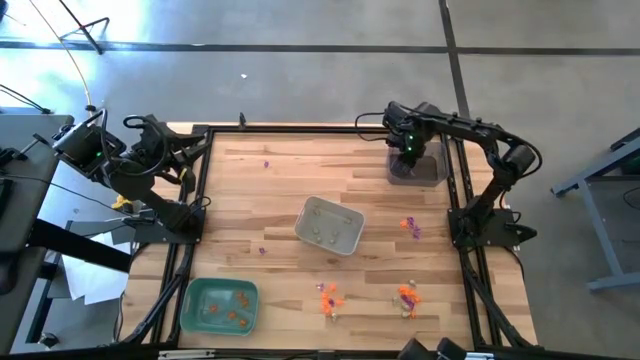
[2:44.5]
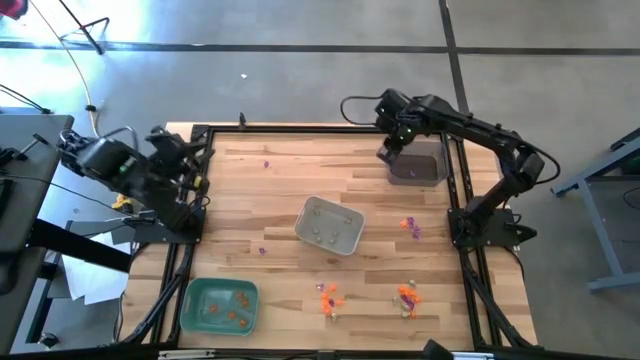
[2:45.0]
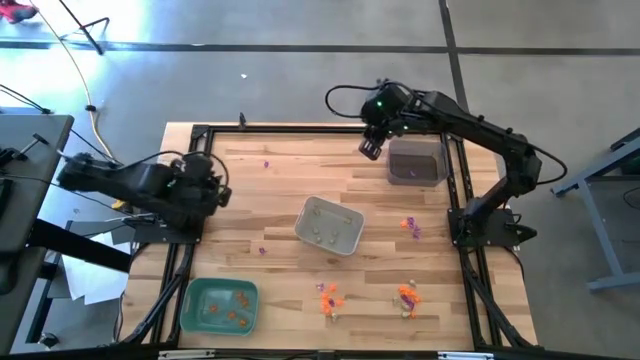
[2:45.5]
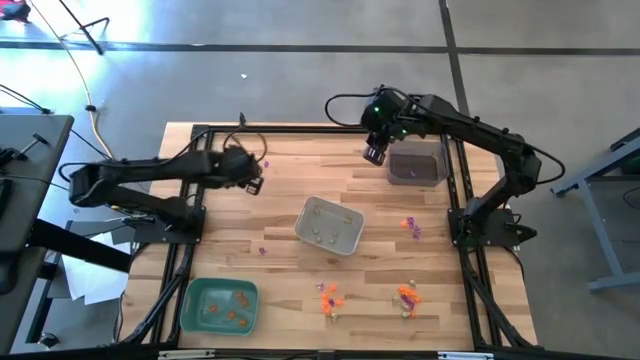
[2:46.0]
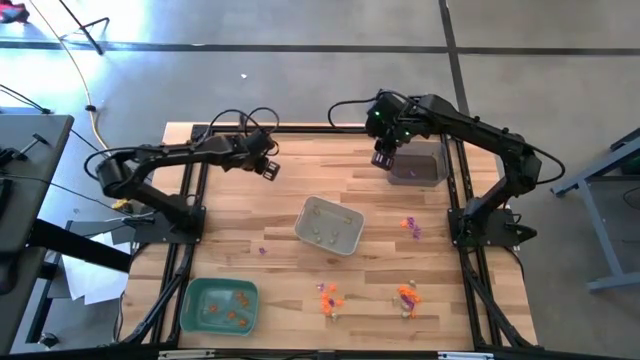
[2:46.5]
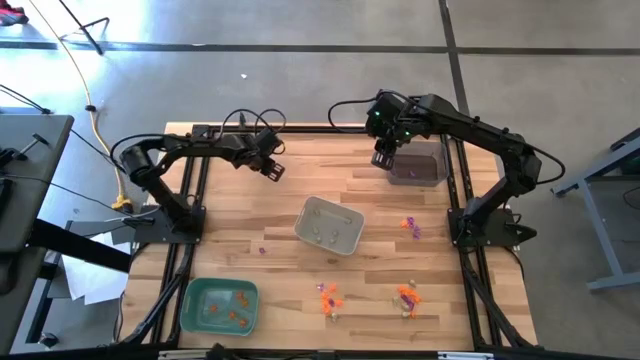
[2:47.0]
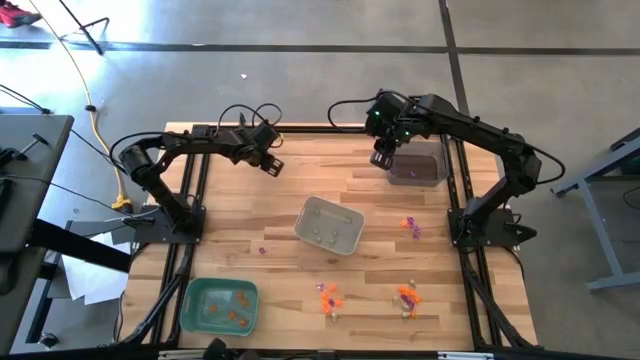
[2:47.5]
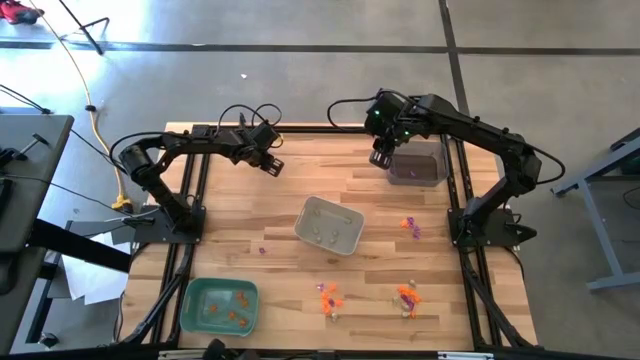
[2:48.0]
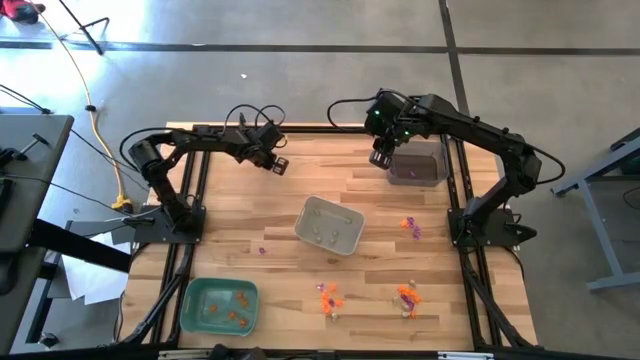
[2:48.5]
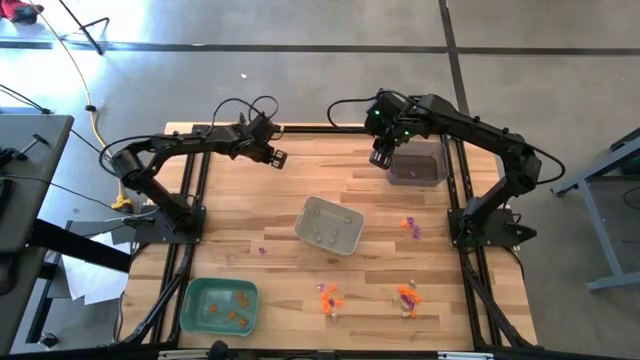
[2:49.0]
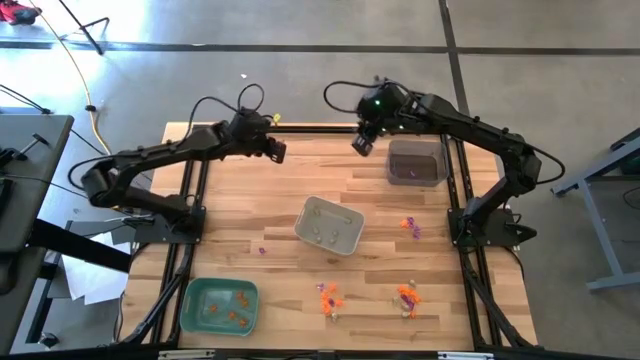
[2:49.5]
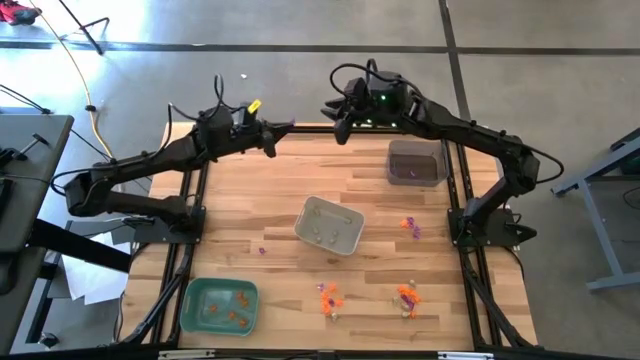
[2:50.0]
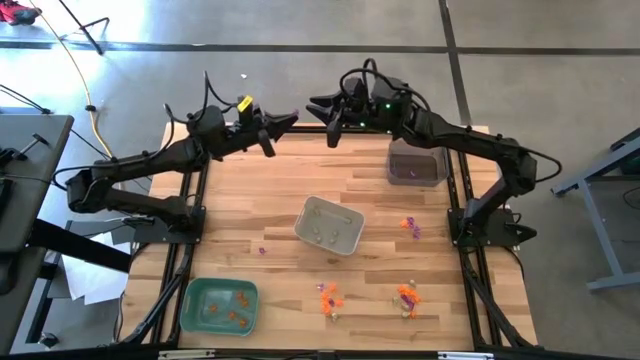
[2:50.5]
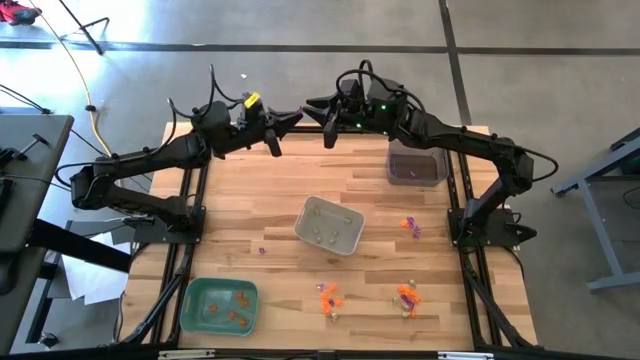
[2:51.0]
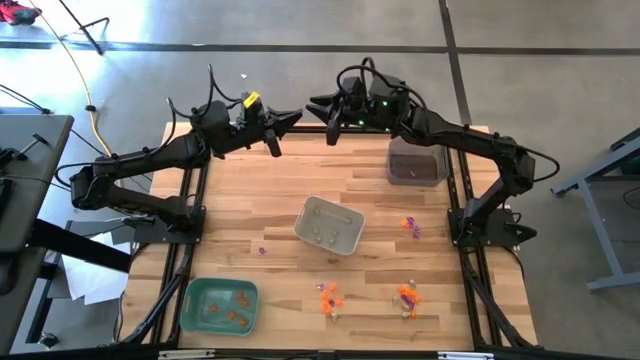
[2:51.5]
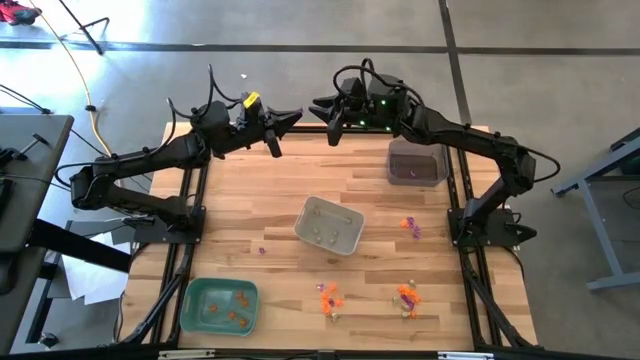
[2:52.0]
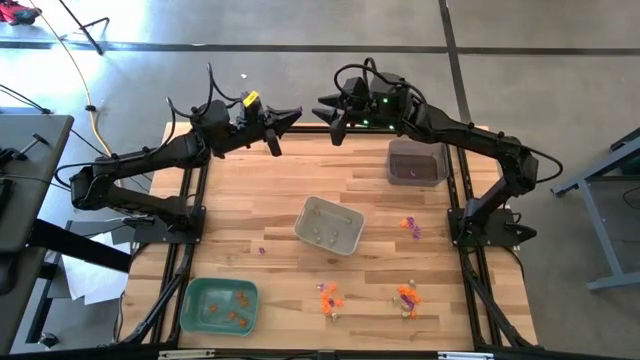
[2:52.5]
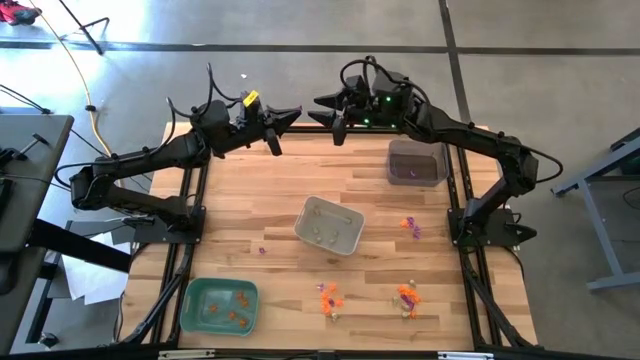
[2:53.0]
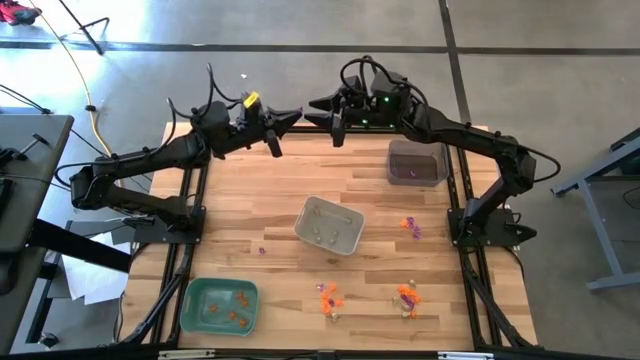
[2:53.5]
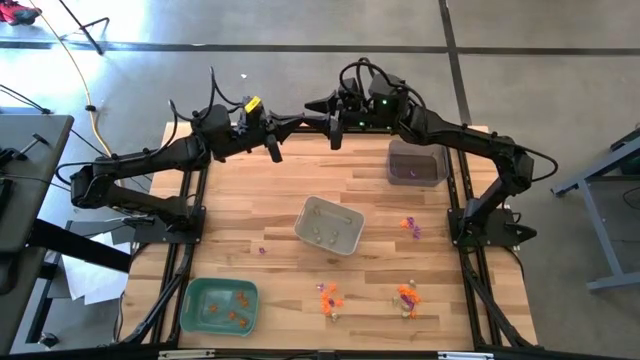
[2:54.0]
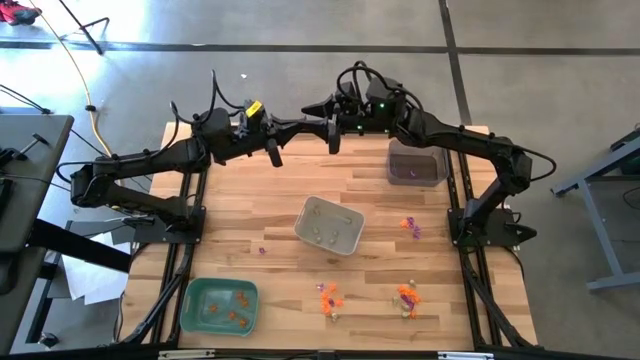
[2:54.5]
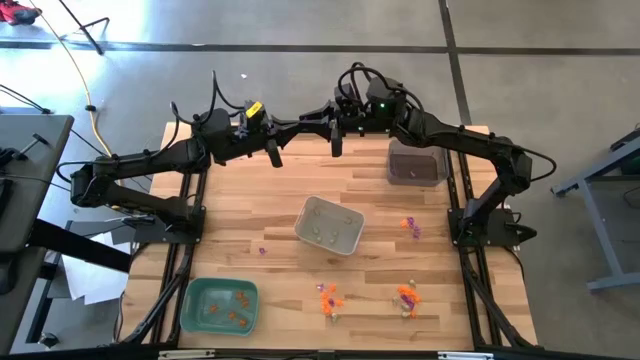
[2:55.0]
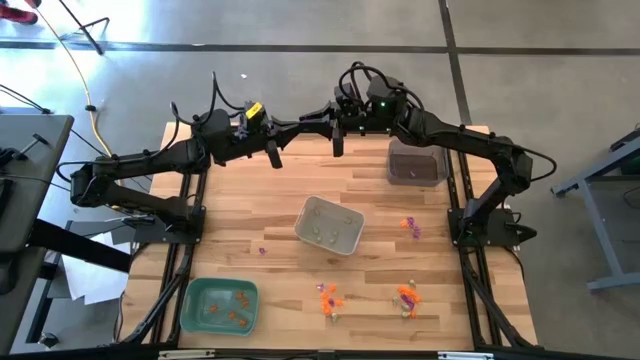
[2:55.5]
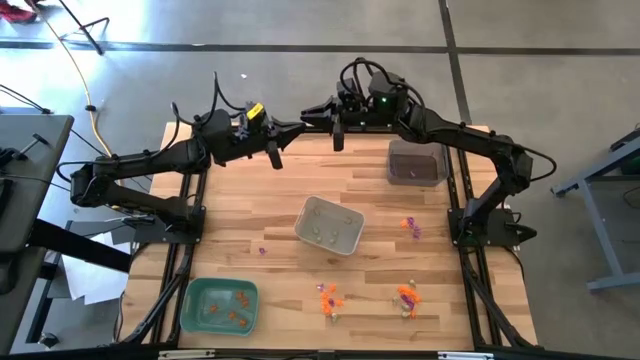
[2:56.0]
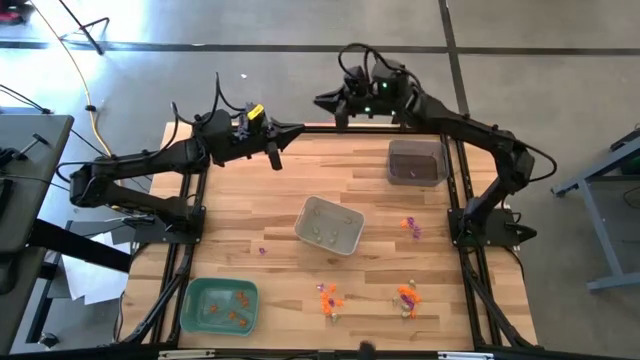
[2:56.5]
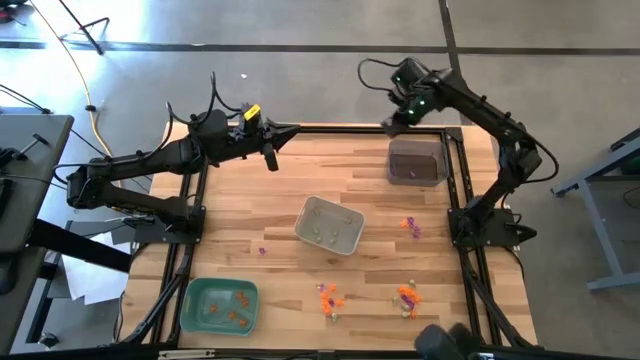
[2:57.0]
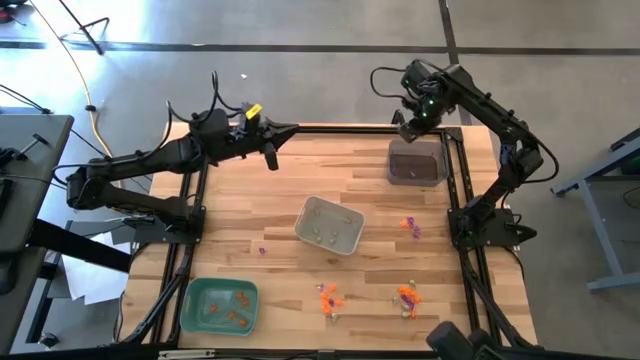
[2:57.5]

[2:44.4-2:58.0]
Task: Sort Halloween decoration
Put the violet witch hat toy into the black bin

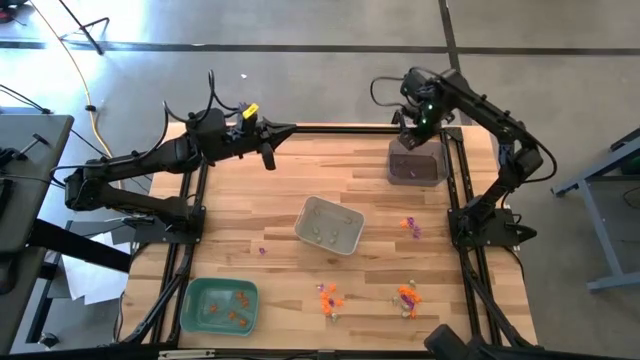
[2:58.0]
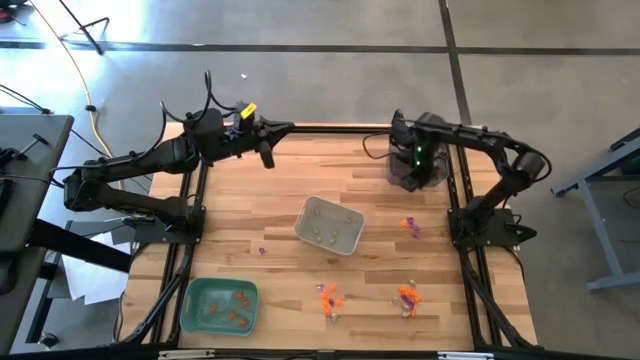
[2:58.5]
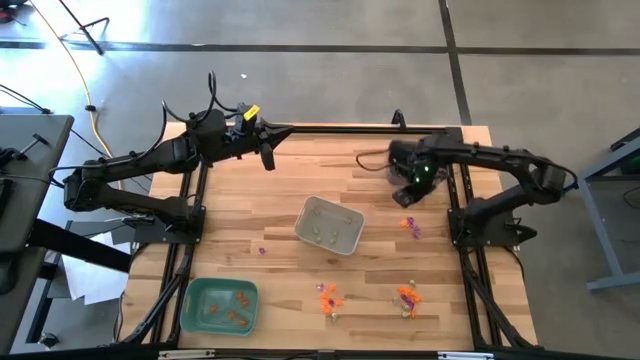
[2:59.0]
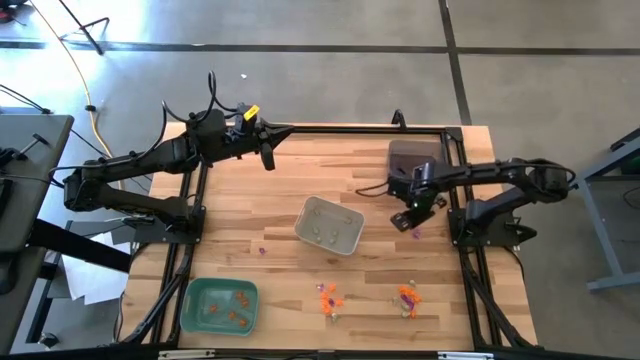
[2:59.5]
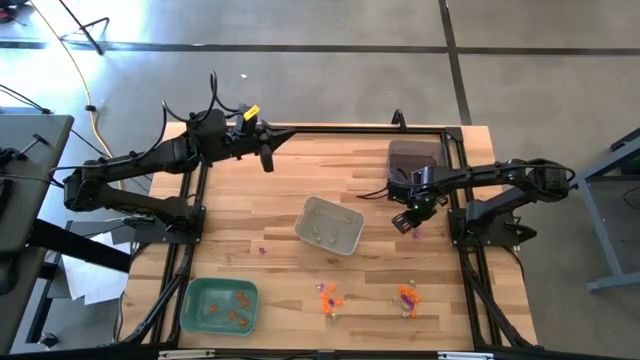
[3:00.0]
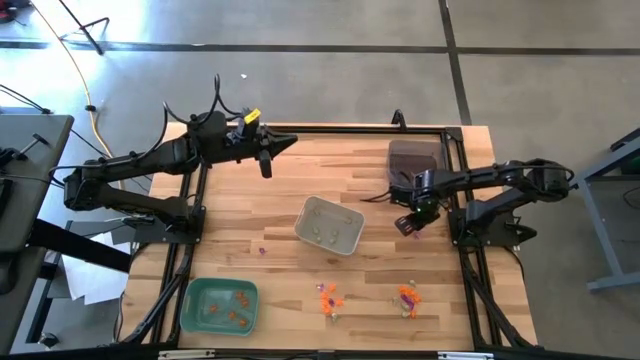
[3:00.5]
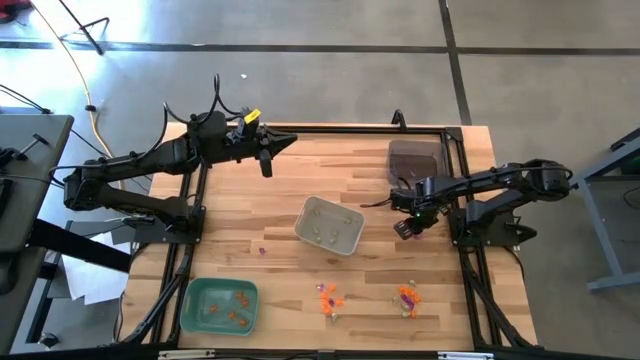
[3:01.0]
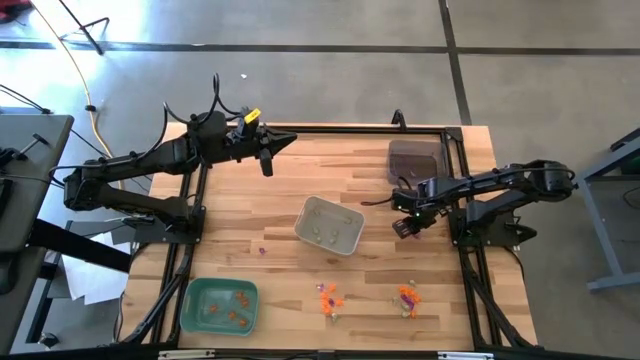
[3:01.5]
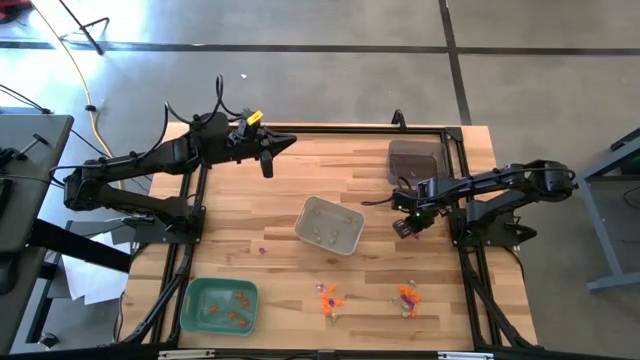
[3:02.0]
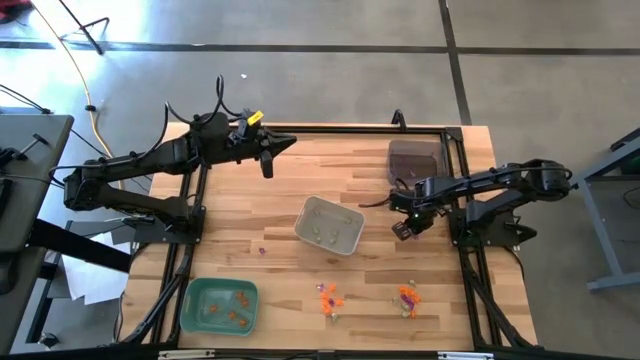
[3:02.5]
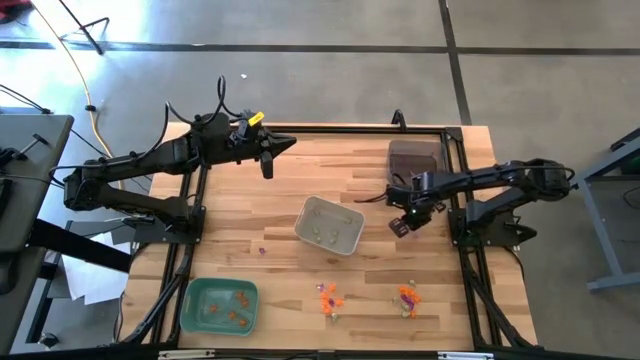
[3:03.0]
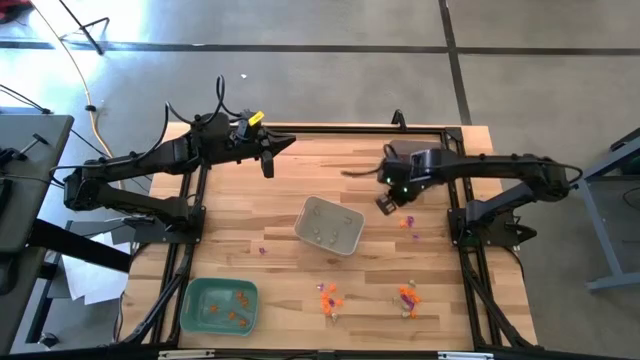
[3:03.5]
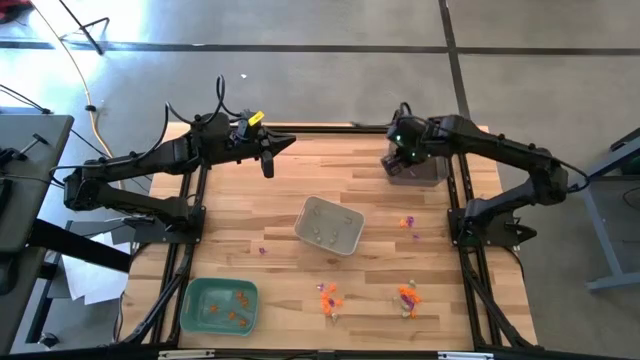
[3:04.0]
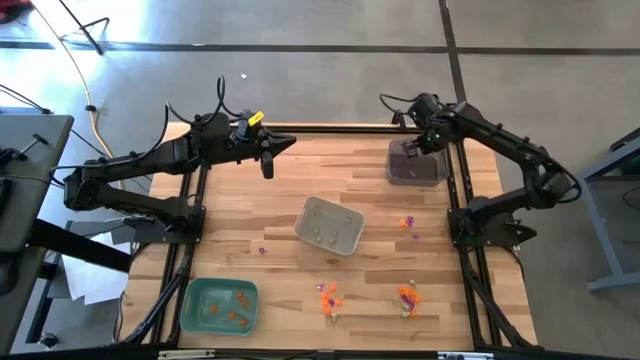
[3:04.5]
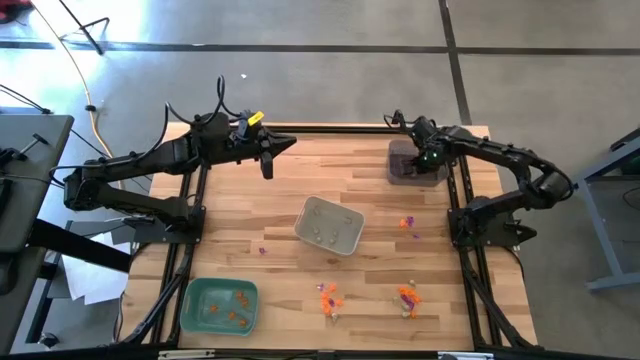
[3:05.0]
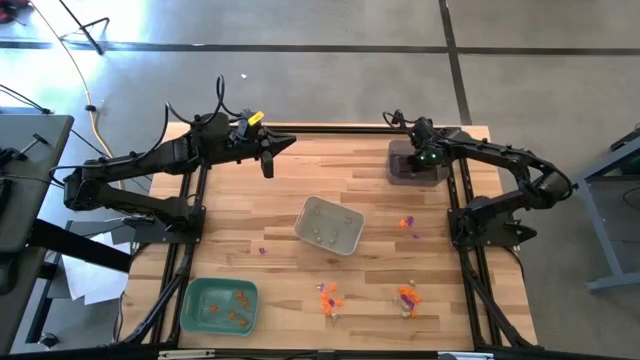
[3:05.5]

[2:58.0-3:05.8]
Put the violet witch hat toy into the black bin

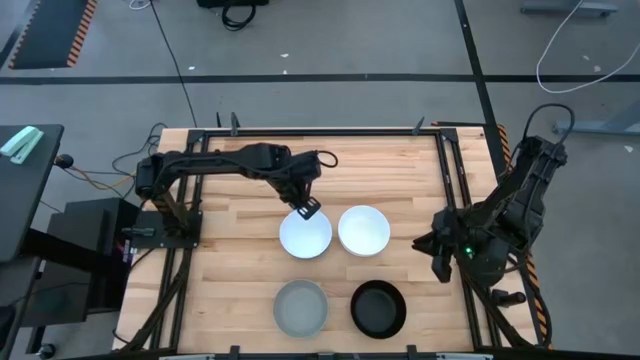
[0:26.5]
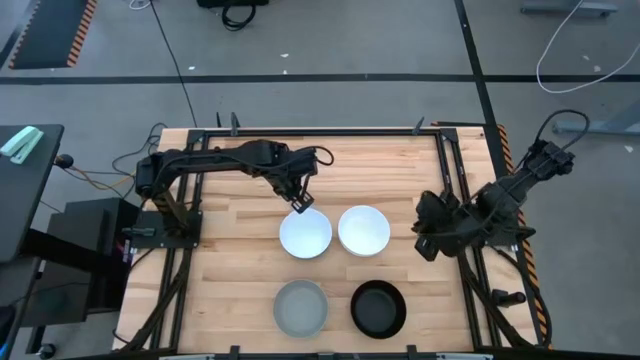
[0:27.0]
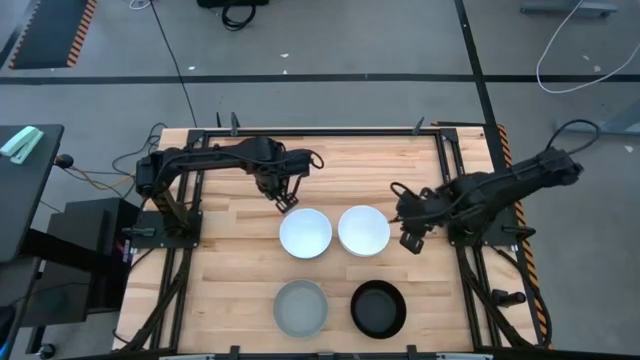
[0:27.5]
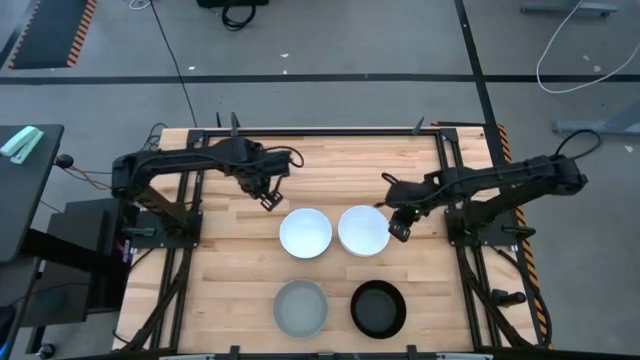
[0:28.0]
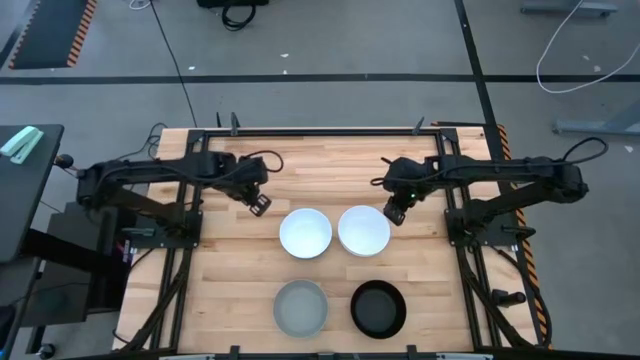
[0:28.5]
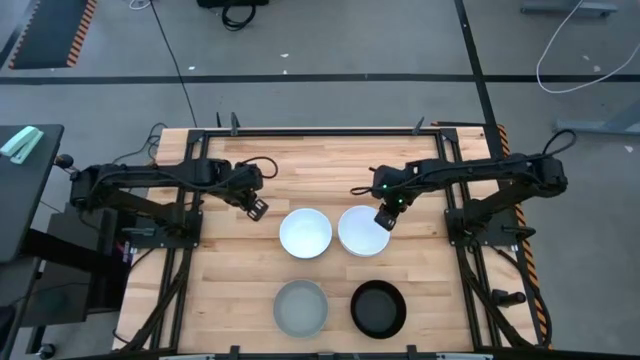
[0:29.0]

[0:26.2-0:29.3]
Task: Nest bowls inside each other
Stack the right white bowl on the left white bowl
